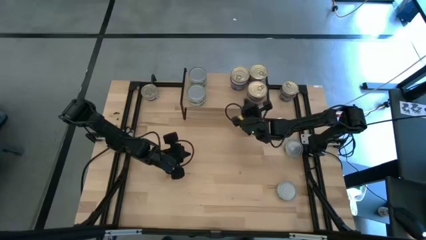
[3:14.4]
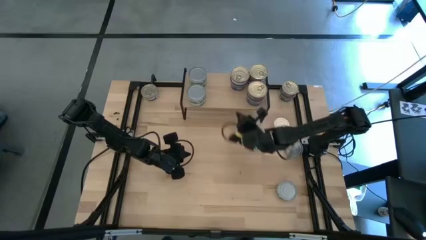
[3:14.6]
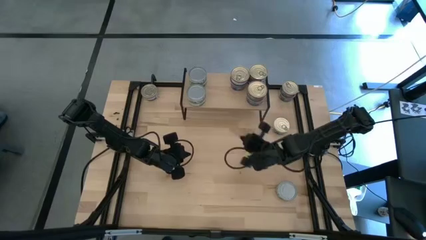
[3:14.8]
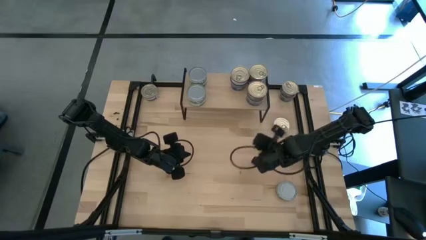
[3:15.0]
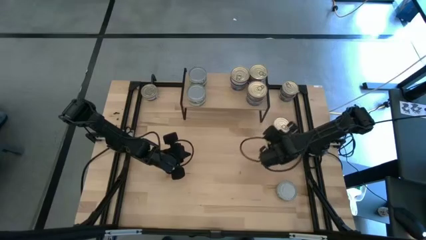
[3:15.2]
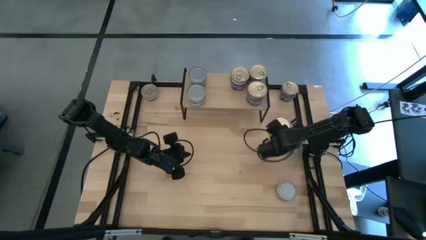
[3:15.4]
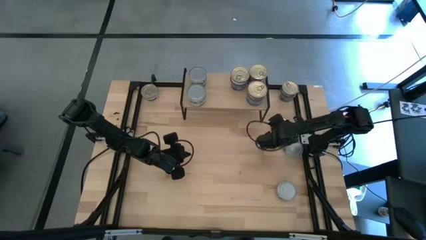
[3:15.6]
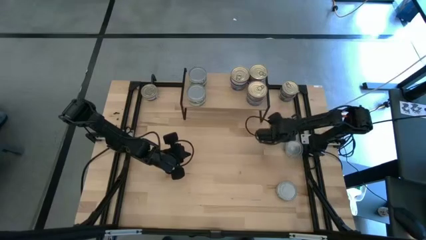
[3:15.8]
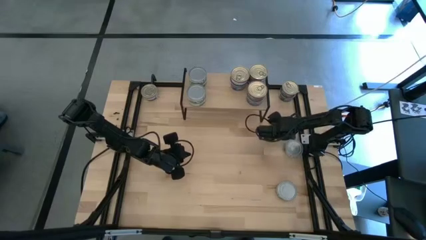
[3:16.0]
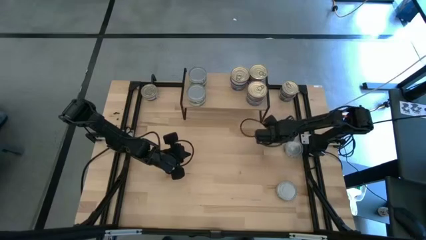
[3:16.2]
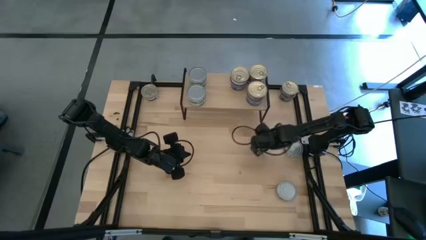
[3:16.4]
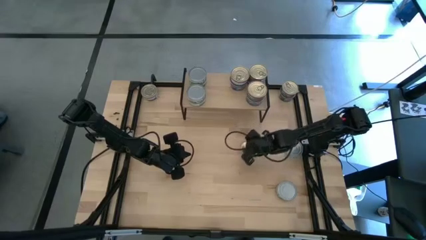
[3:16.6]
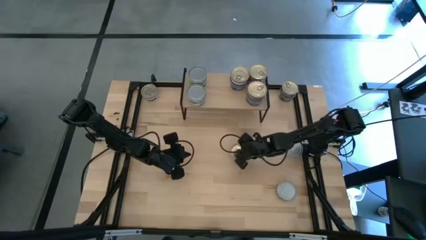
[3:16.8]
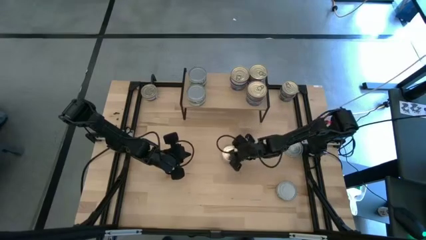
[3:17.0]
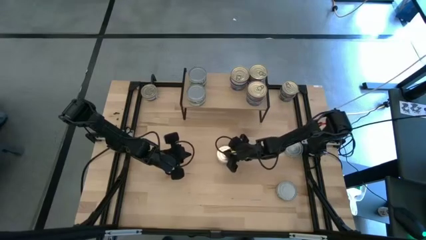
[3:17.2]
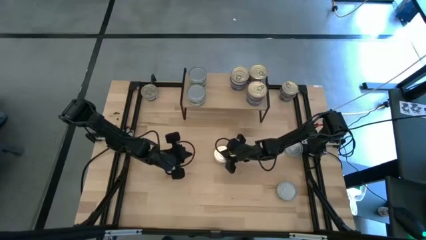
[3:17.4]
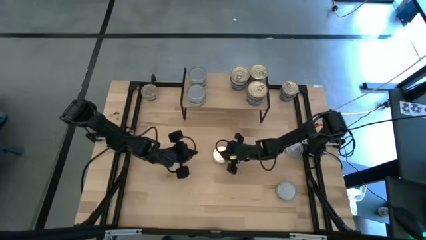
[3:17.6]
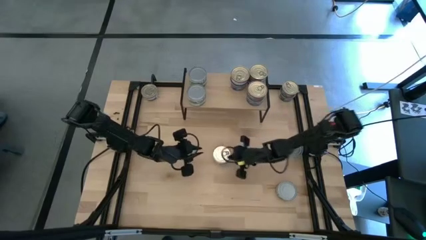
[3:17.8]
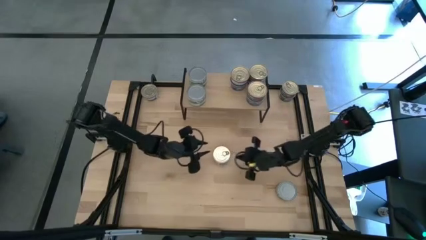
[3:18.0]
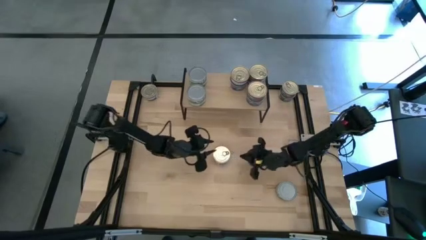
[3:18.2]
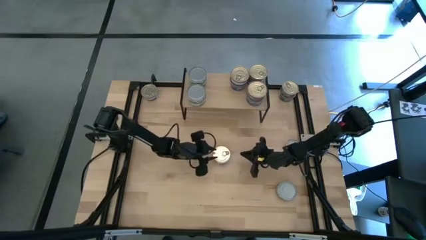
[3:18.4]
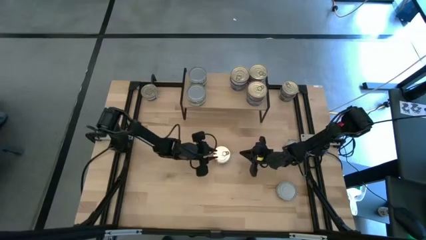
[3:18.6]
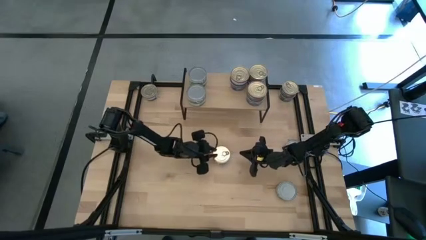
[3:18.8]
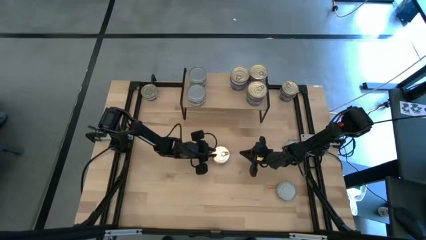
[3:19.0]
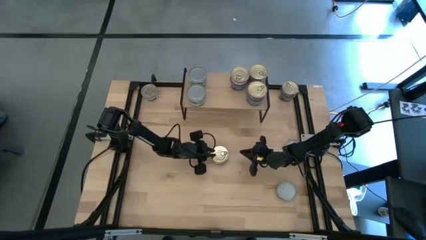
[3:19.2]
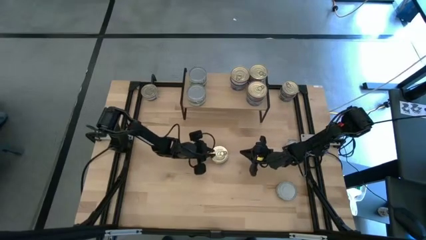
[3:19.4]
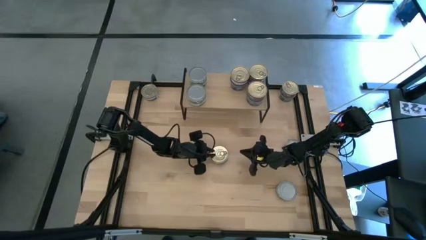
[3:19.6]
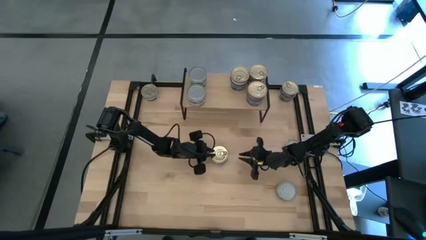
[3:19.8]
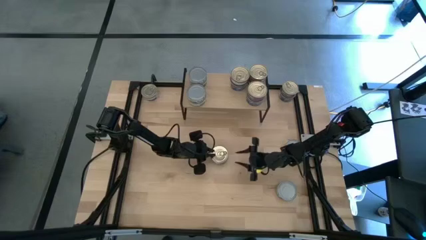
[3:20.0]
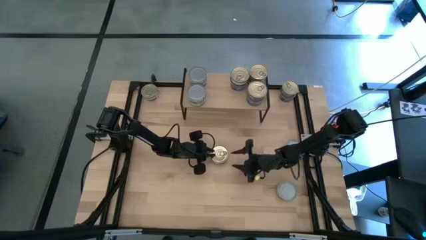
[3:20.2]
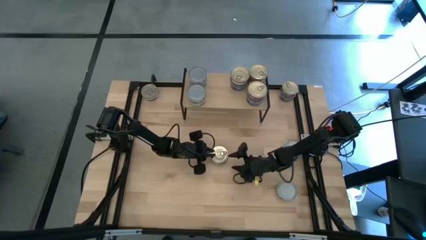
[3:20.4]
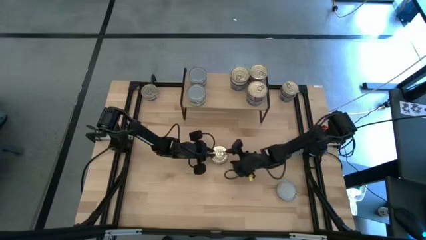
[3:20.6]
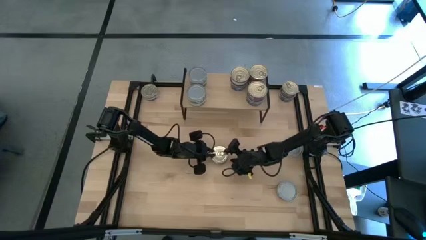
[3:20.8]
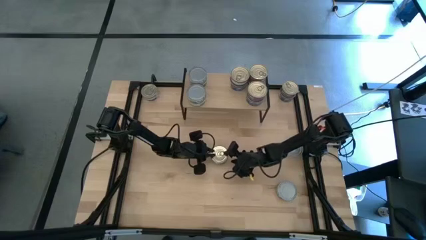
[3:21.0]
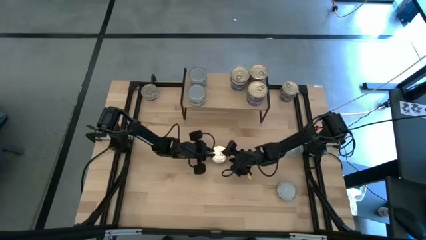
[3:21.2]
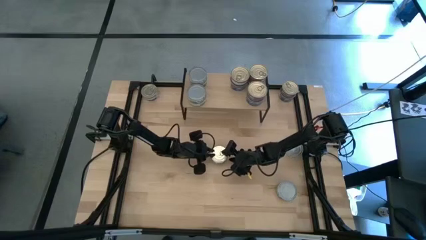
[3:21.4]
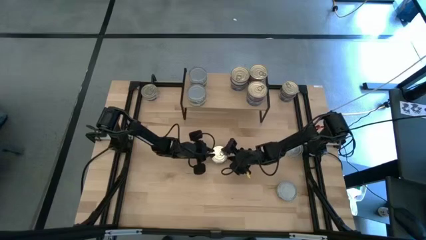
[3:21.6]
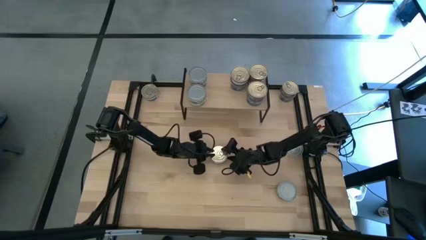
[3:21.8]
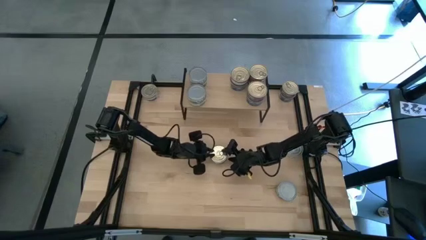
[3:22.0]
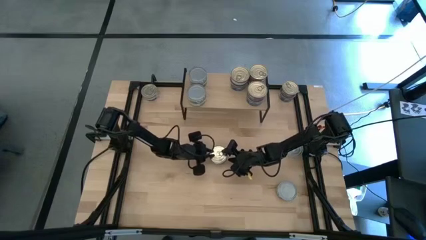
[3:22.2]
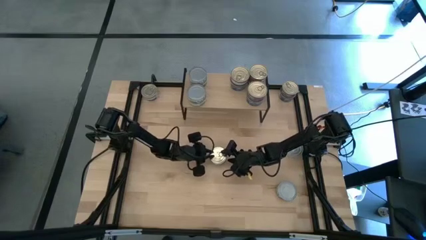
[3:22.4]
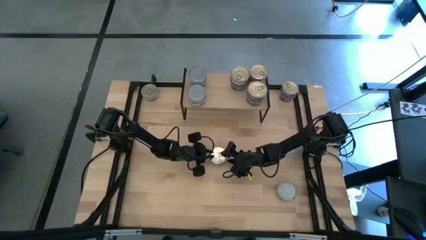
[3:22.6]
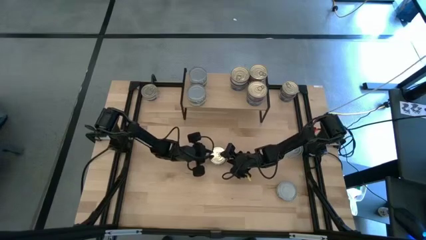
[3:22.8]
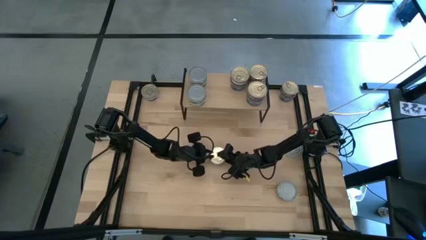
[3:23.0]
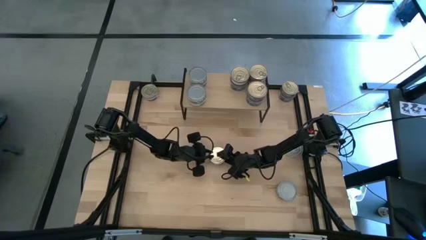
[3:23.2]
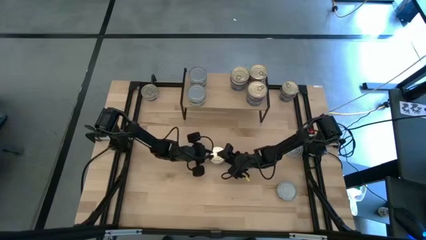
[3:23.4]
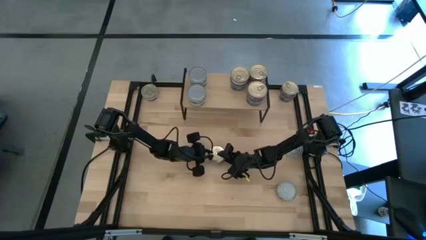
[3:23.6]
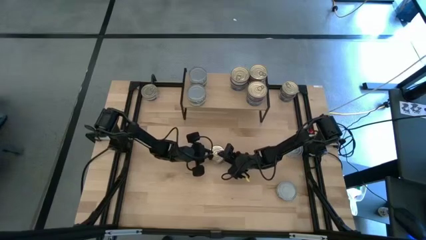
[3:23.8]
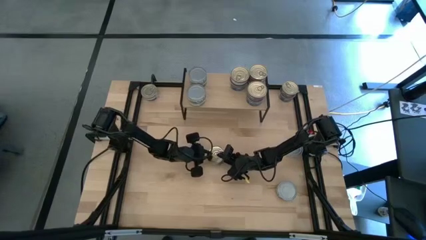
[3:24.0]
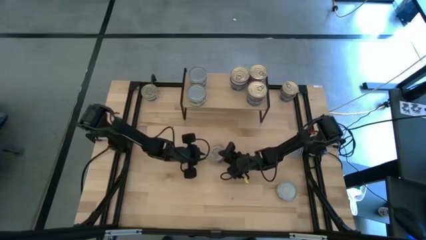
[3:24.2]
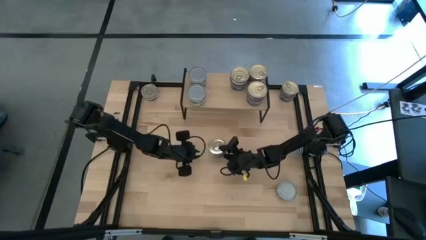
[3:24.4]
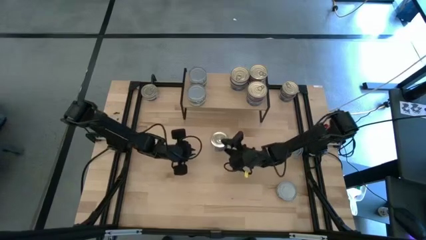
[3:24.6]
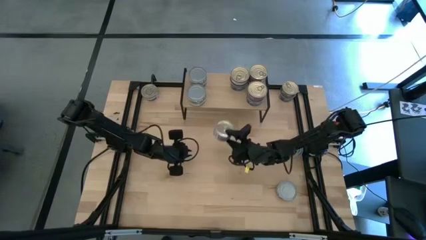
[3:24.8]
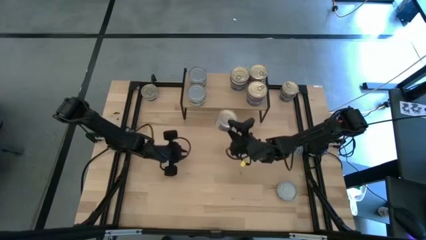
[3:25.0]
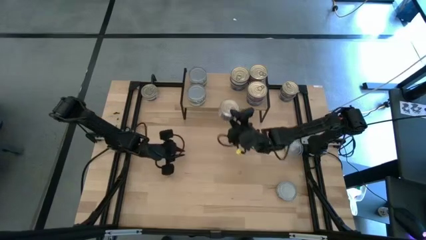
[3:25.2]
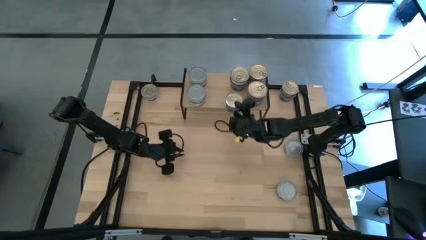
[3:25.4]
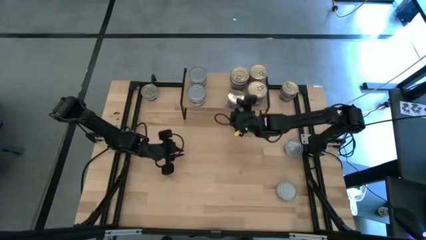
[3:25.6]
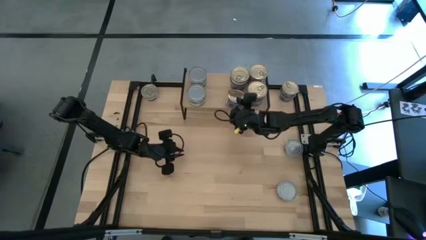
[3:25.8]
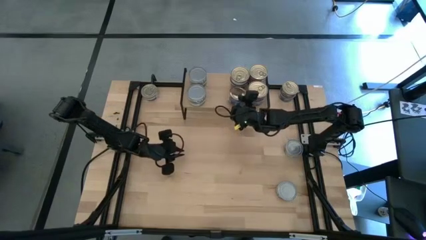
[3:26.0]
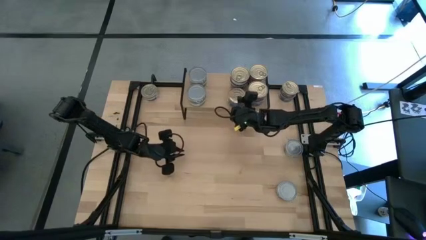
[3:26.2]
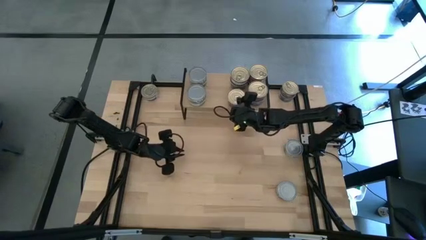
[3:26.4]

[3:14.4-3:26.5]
Task: Stack canned seafood by type on shelf
Put the blue pink tuna can on the shelf aligned with the other blue pink tuna can

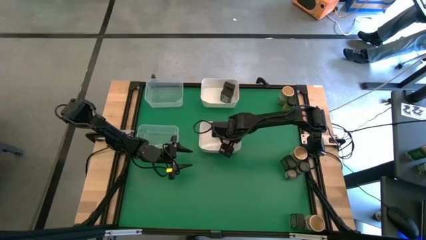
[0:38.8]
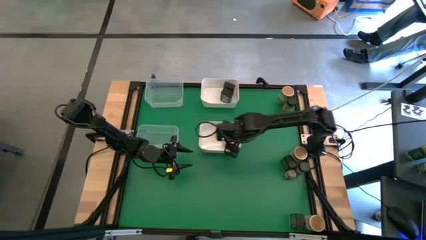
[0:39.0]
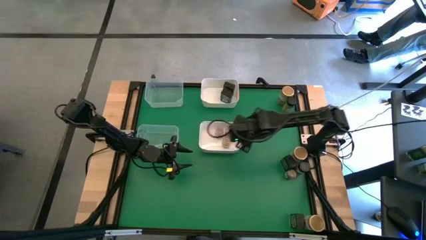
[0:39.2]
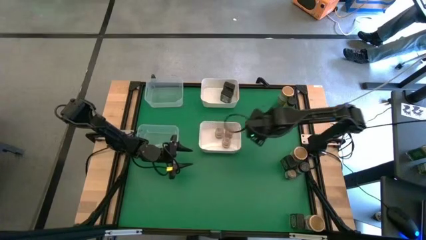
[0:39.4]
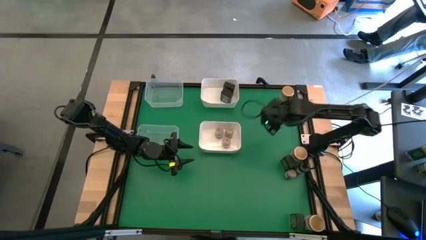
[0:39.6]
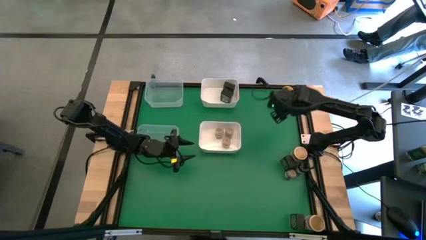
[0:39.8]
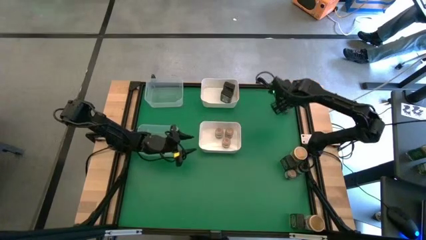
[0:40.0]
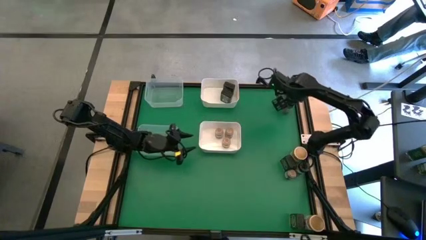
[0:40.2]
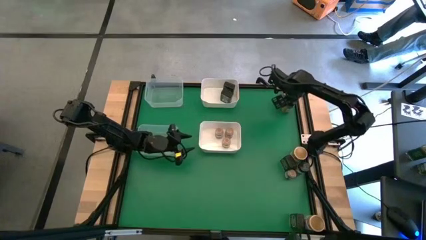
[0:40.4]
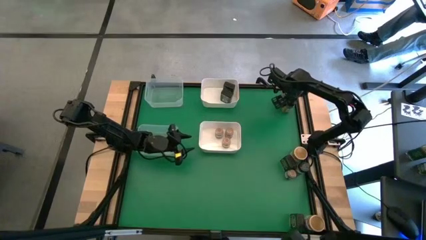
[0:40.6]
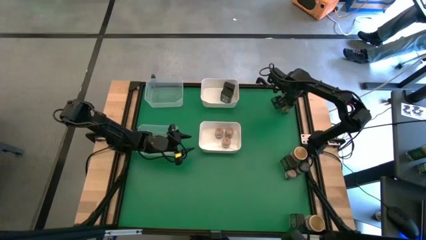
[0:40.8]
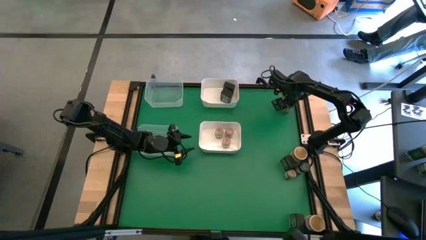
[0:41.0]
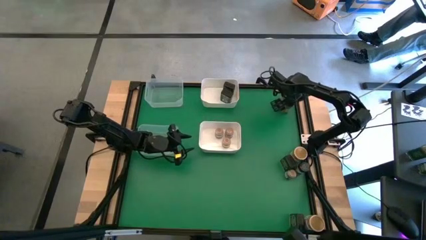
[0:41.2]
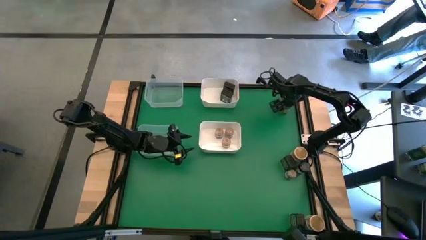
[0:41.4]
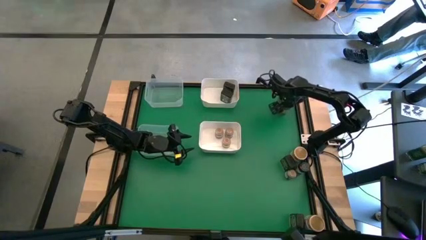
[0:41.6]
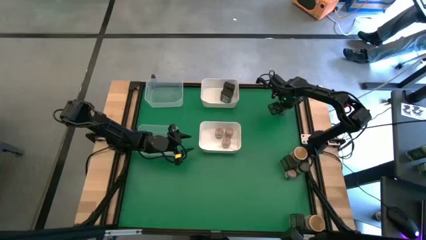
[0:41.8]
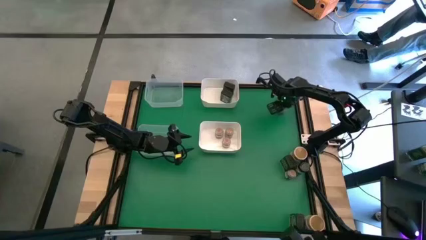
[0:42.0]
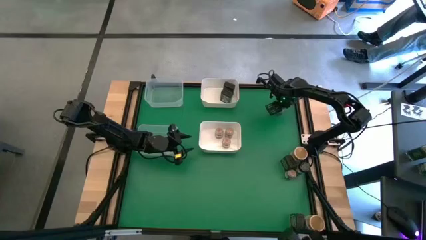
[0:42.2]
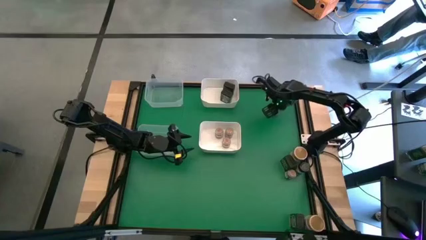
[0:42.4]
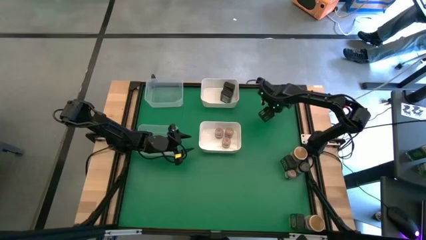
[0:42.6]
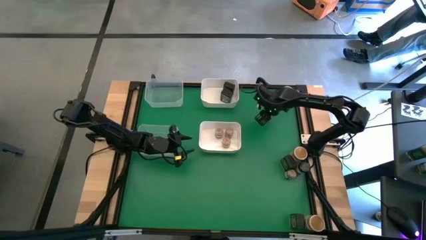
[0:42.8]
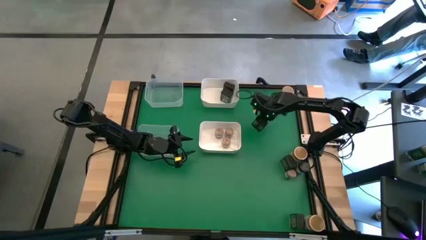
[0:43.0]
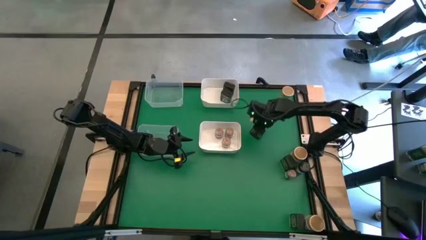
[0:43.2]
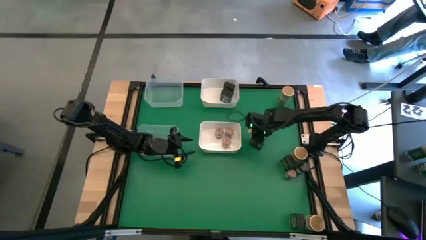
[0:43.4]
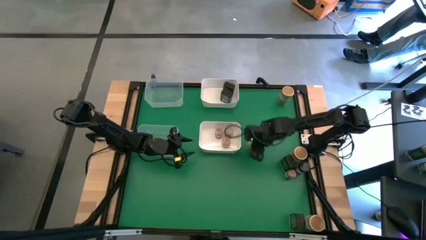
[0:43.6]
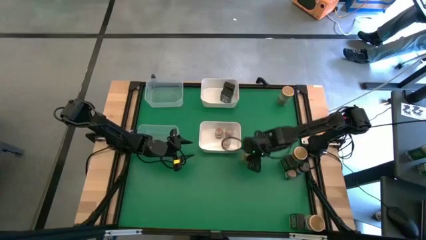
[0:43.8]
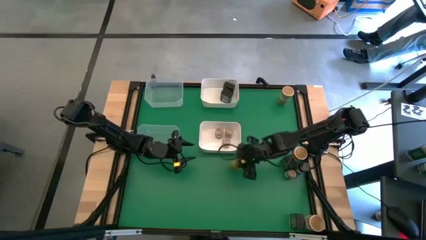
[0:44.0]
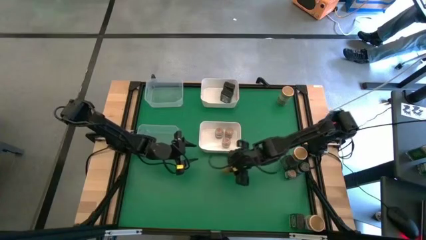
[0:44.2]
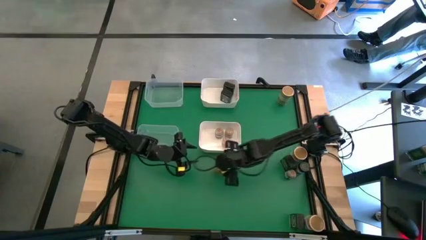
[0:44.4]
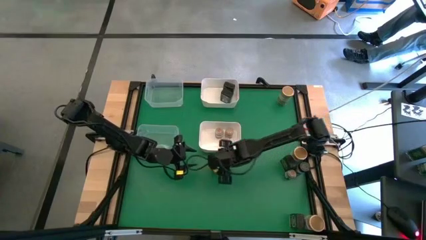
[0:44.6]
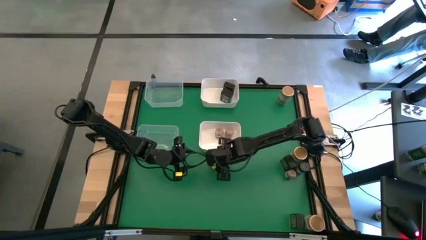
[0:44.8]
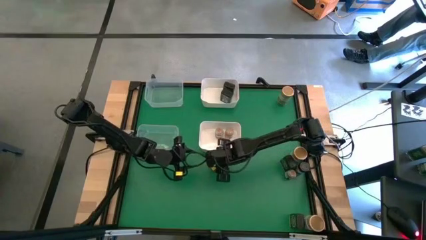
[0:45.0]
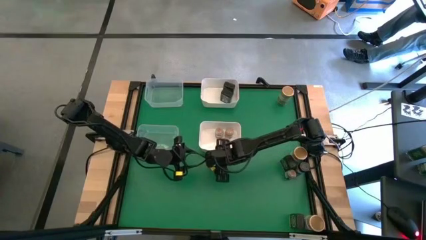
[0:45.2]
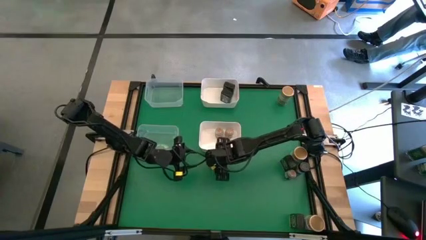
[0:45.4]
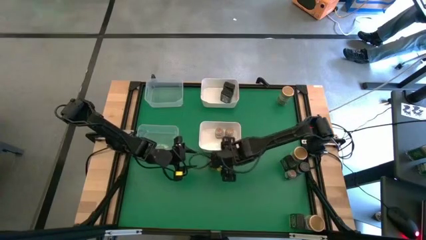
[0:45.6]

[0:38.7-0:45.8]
Task: Sort spices by type
Move the top green seasoning bottle to the center of the table
